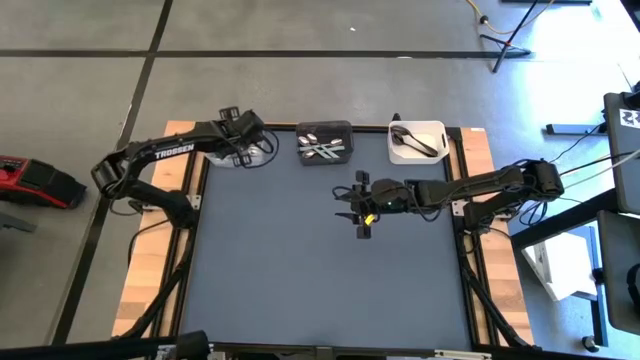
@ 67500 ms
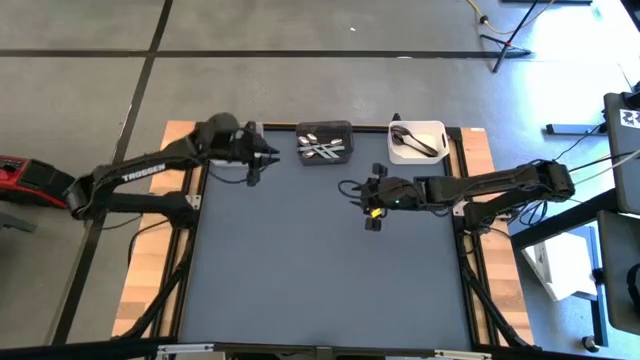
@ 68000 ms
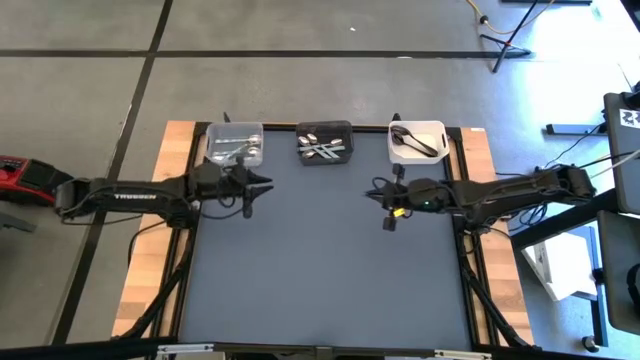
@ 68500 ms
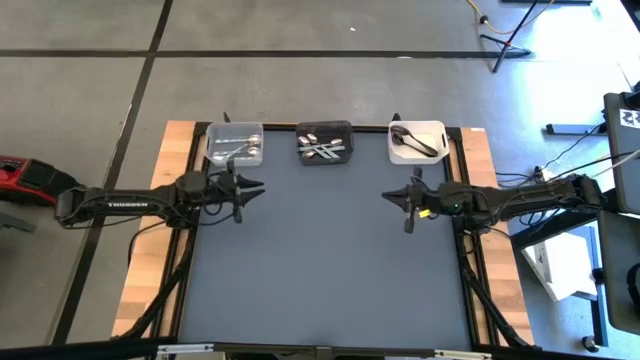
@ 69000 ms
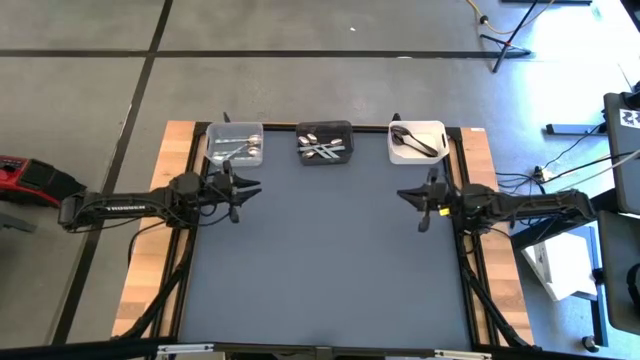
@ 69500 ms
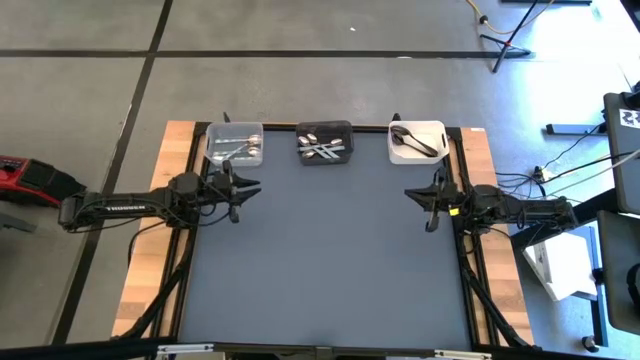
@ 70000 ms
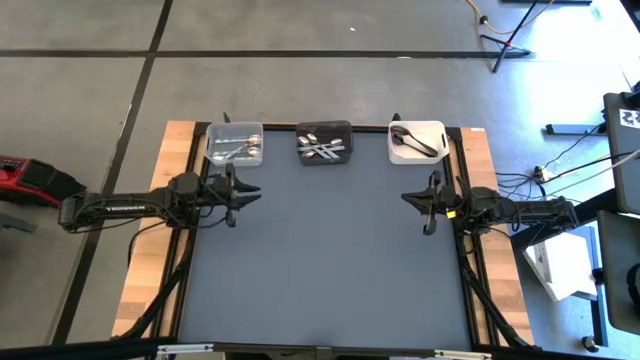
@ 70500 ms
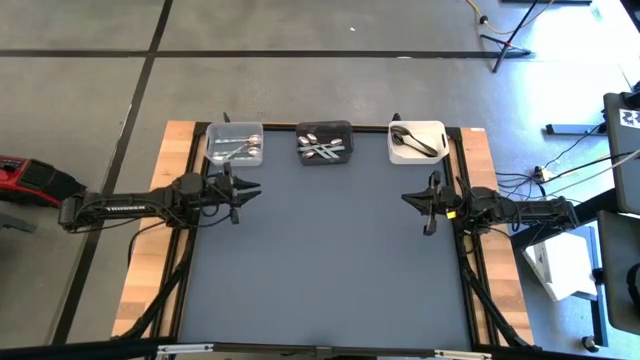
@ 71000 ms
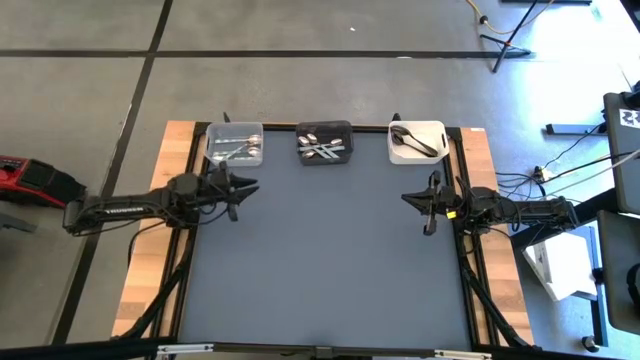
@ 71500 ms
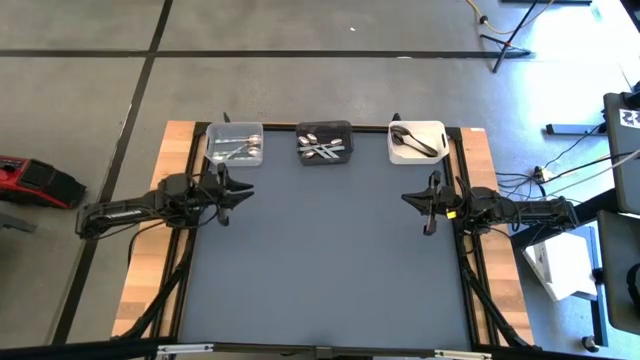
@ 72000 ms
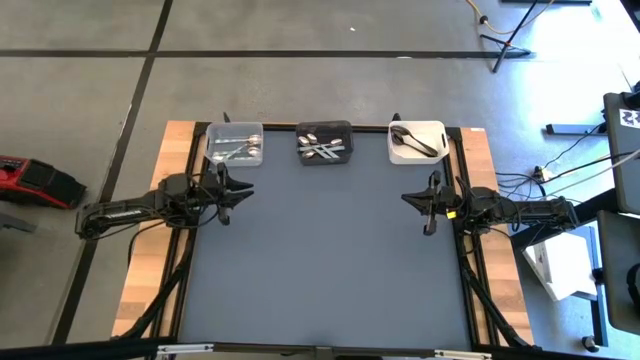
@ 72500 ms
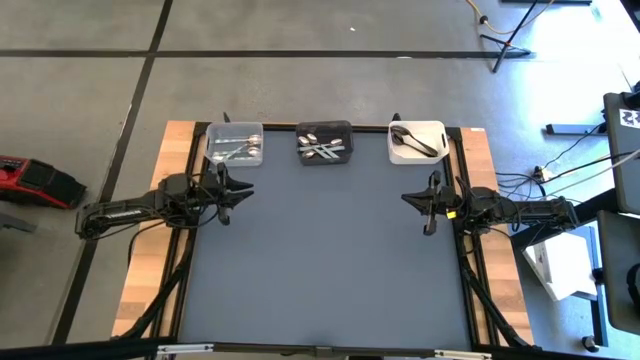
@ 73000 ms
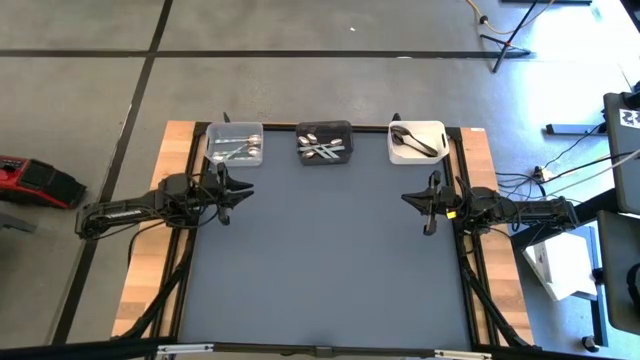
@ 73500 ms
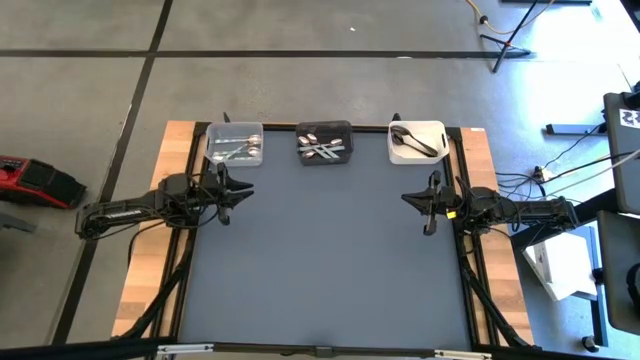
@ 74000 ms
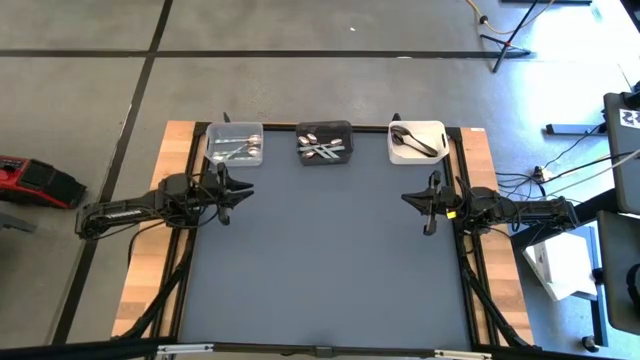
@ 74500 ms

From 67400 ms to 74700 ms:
Task: Sort silverware by color (type)
Return to Home Position

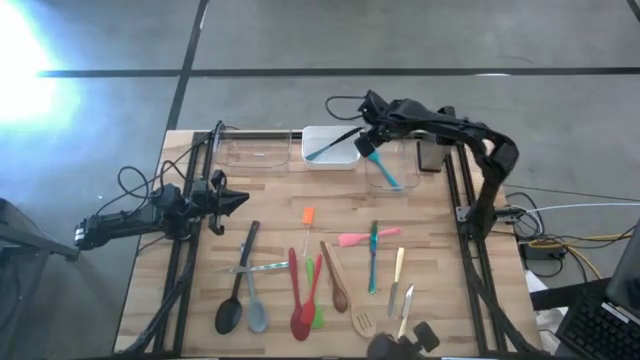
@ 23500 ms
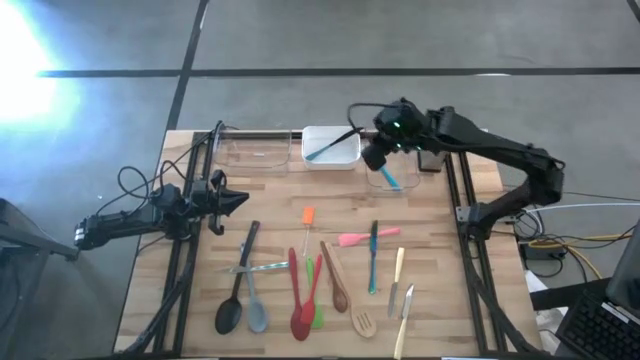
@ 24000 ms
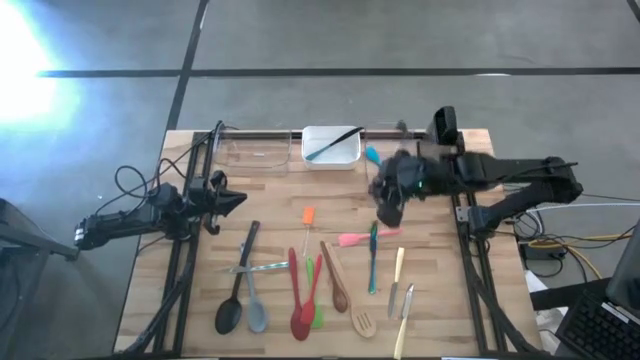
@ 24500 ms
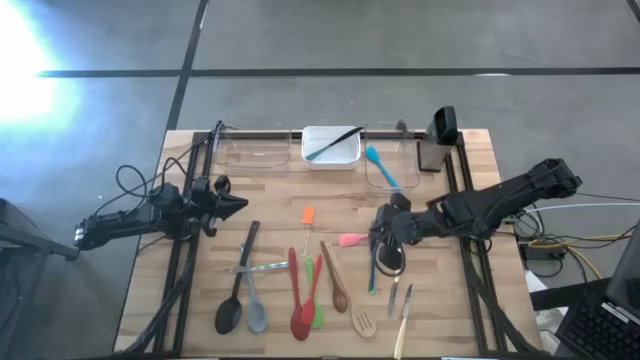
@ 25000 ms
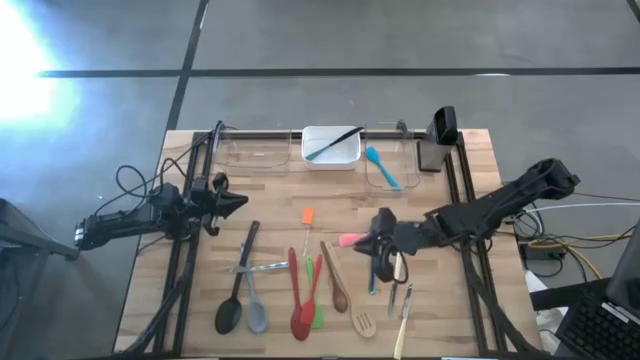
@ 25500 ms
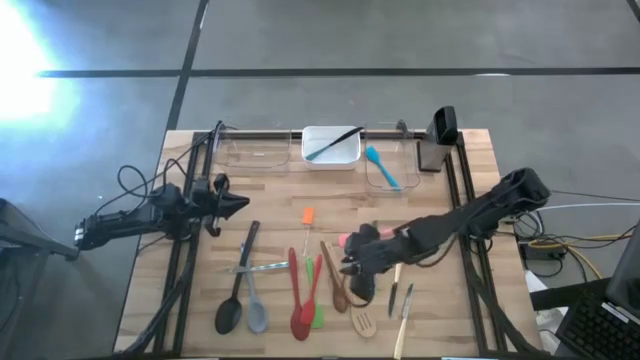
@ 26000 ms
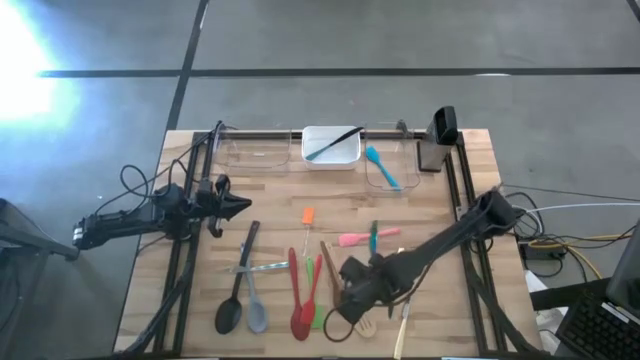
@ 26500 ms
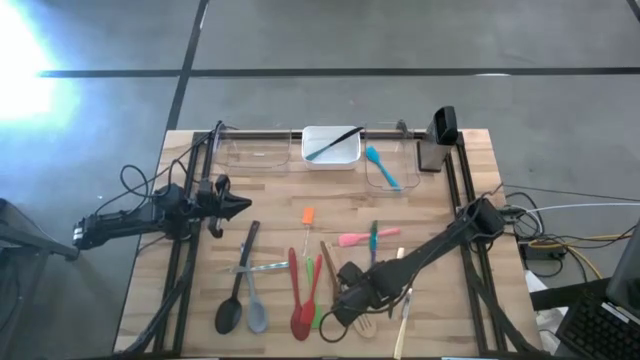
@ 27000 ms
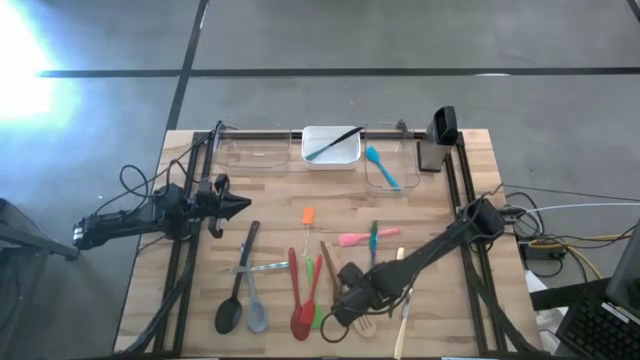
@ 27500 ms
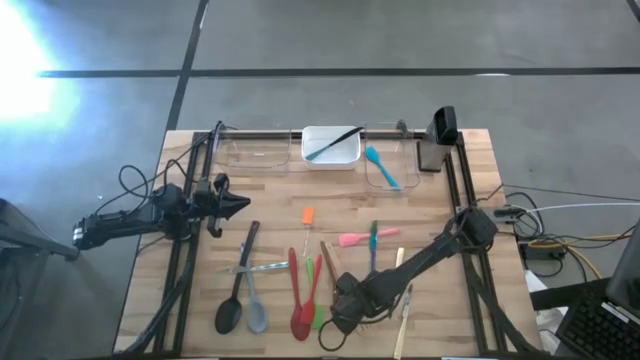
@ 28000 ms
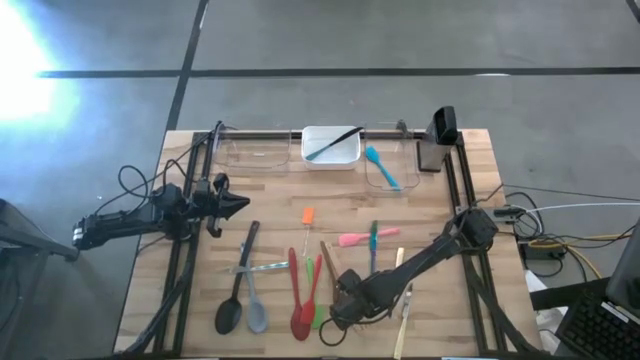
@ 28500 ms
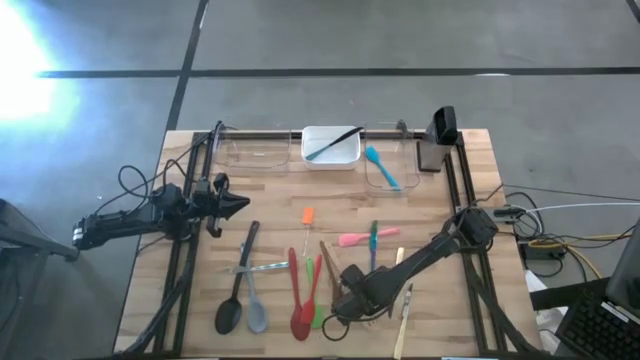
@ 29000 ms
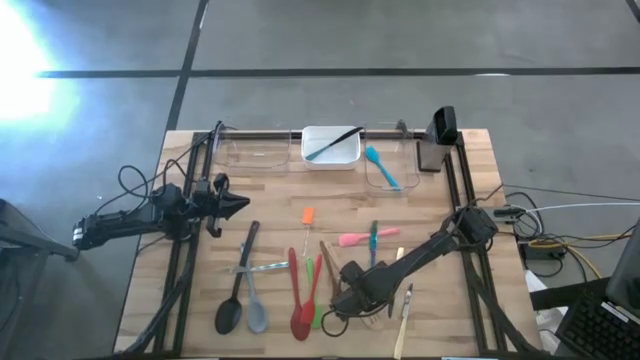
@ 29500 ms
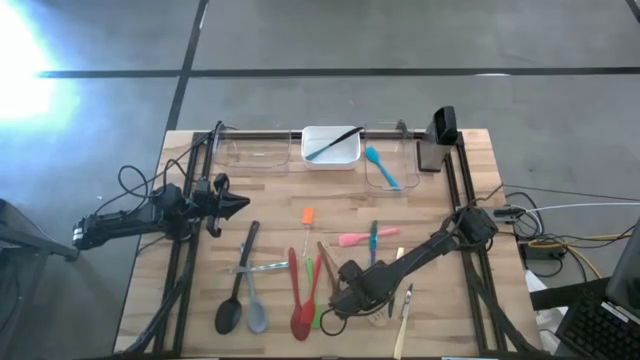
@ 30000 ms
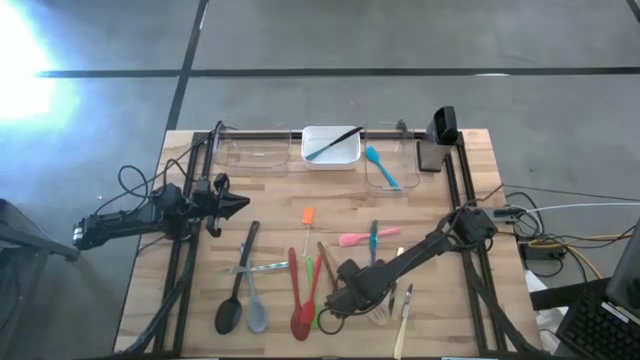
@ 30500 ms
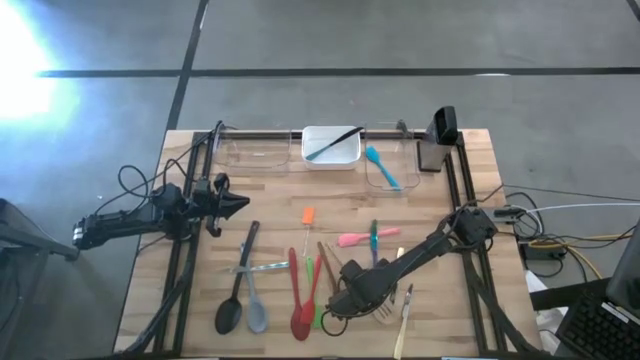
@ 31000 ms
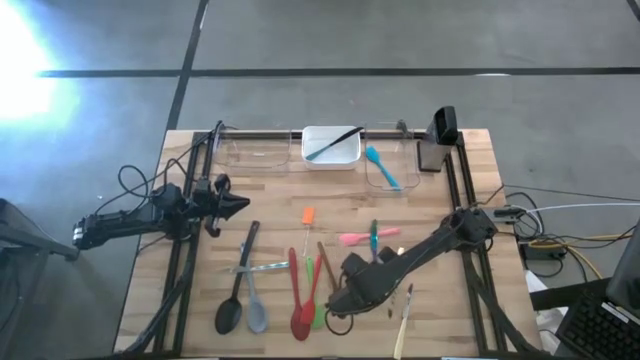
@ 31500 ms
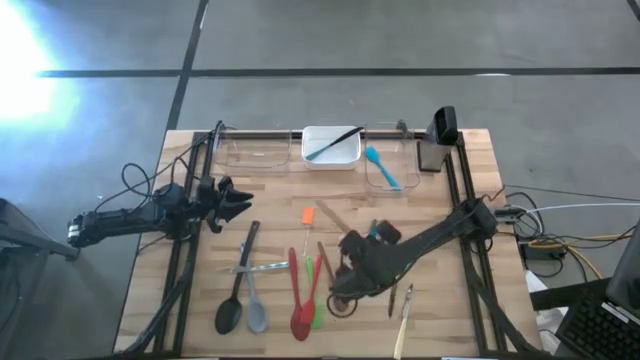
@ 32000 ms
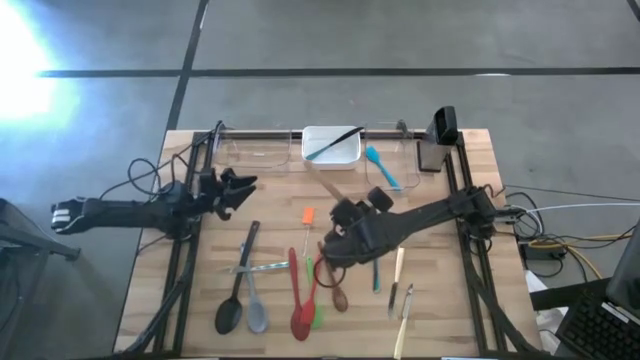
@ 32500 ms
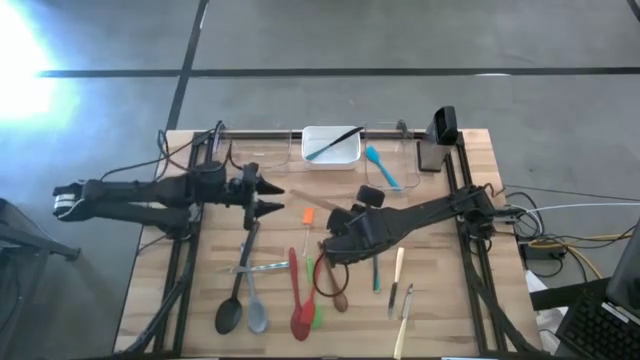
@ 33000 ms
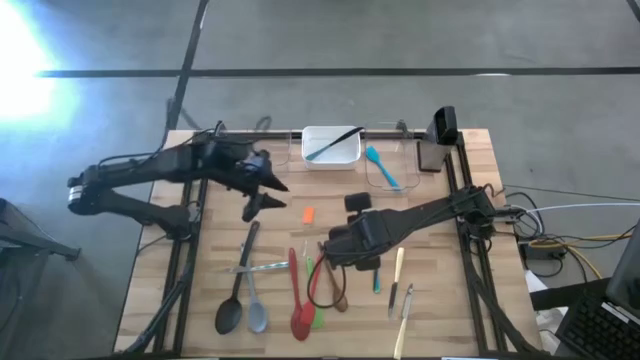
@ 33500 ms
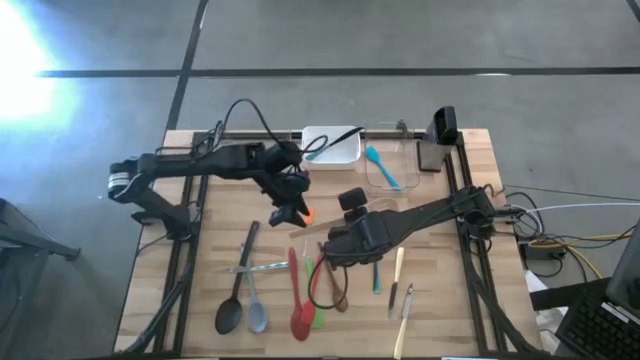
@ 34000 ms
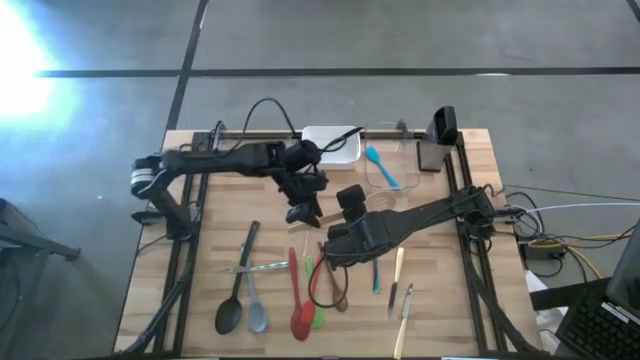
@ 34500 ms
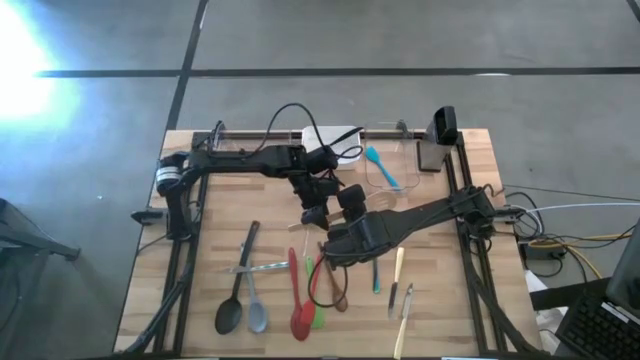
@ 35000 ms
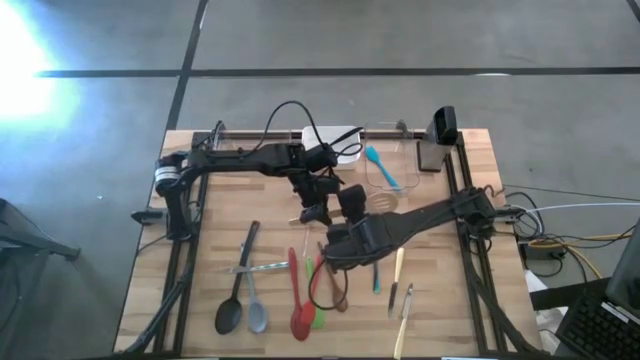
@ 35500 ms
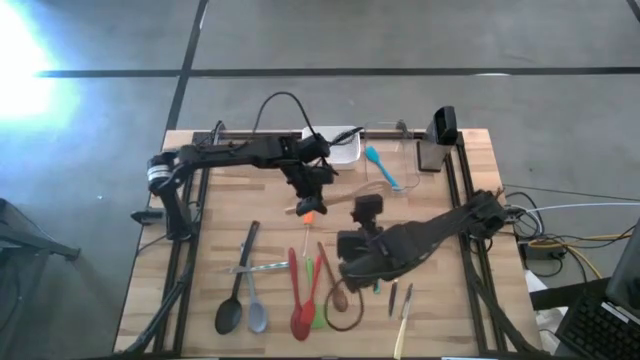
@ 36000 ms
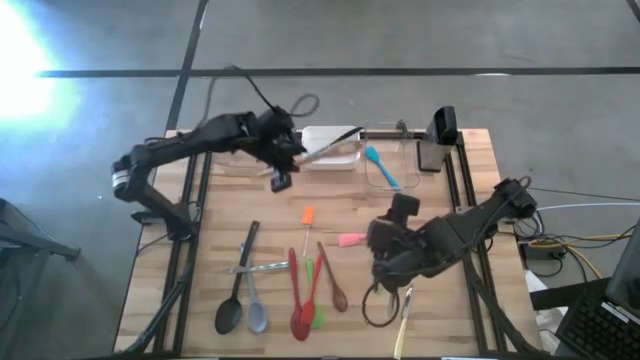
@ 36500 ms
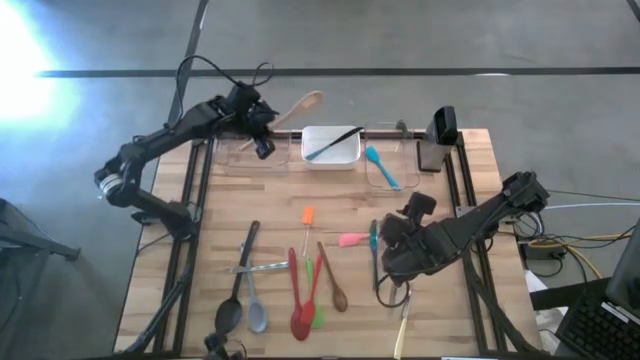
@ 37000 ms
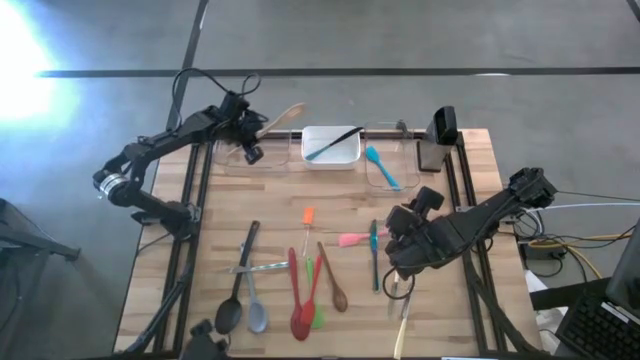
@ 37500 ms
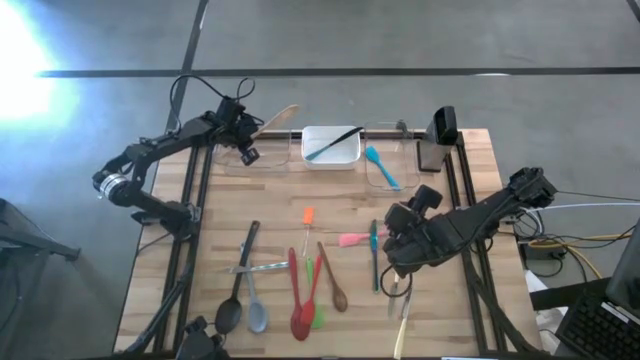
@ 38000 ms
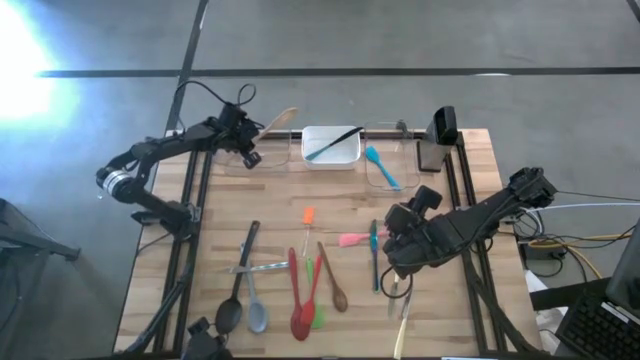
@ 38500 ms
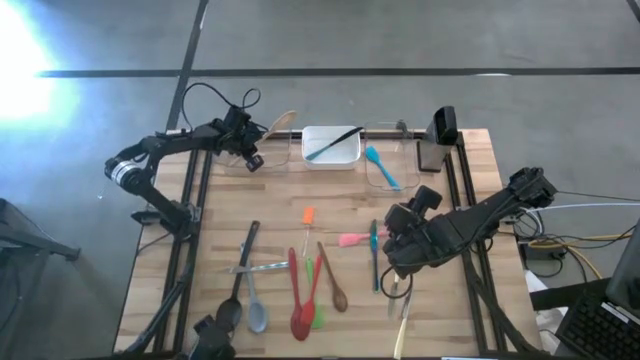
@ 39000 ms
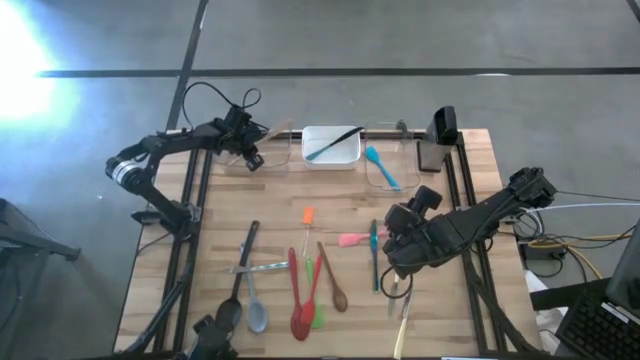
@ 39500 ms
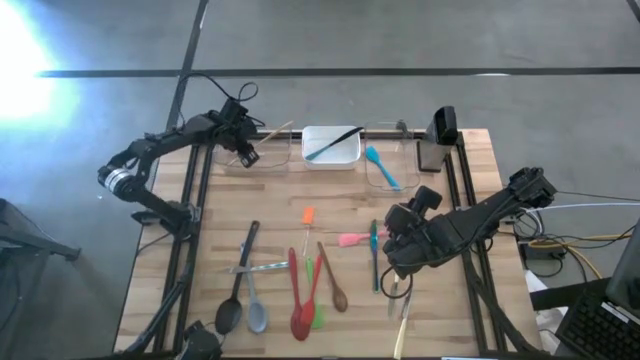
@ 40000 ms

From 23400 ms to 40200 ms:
Task: Pick & Place Kitchen Items
Put the light brown serving spoon into the left transparent bin
